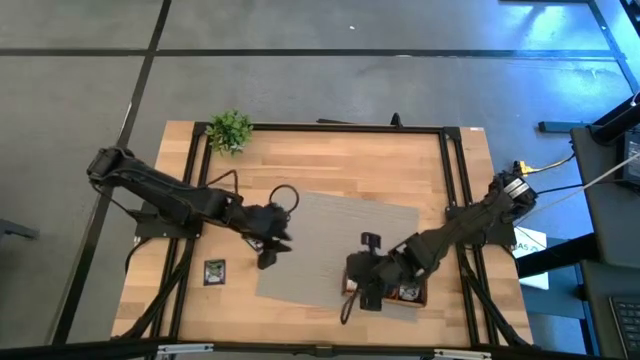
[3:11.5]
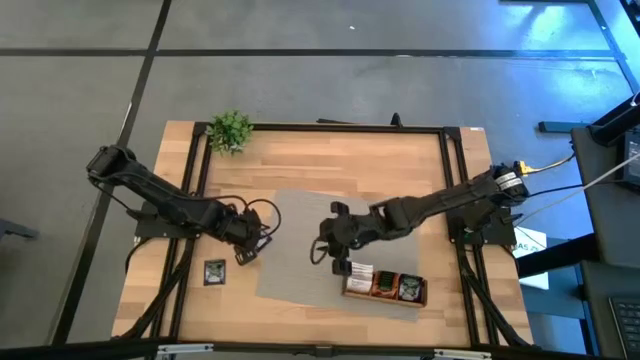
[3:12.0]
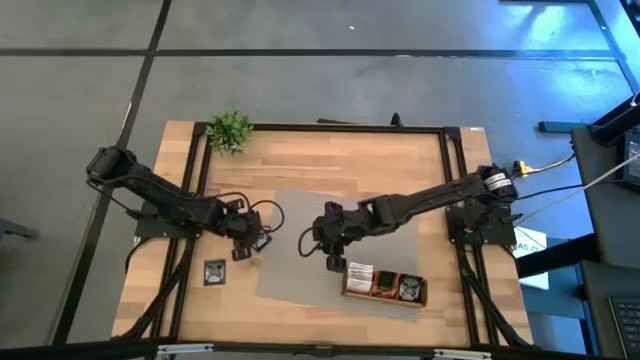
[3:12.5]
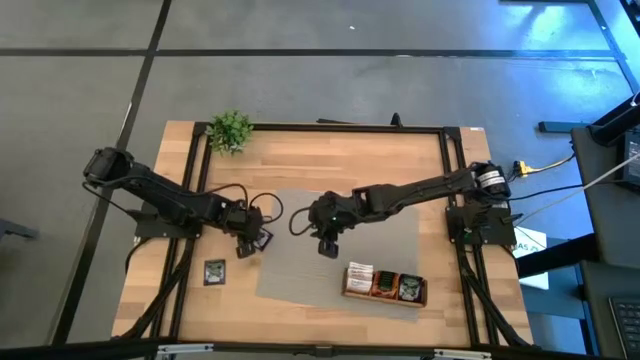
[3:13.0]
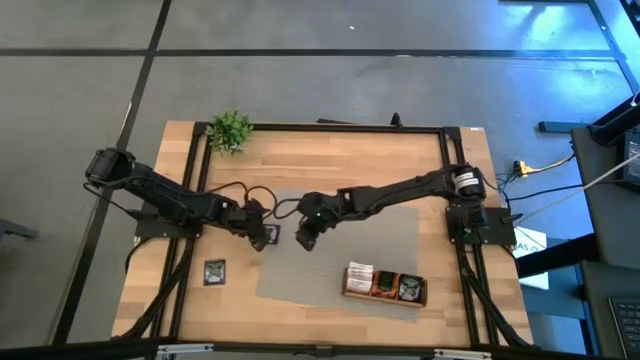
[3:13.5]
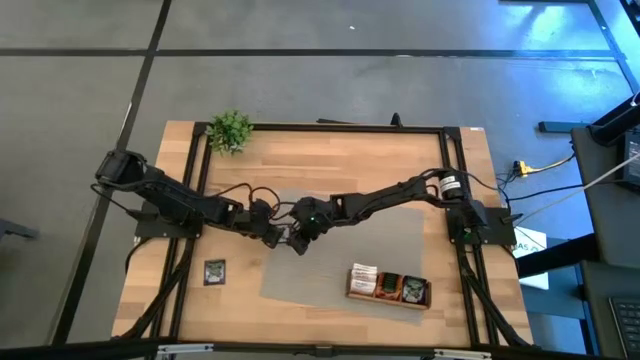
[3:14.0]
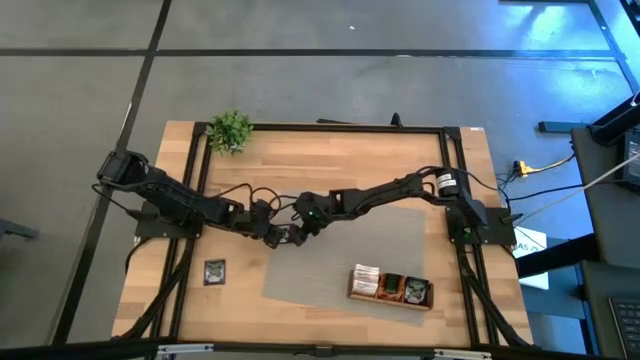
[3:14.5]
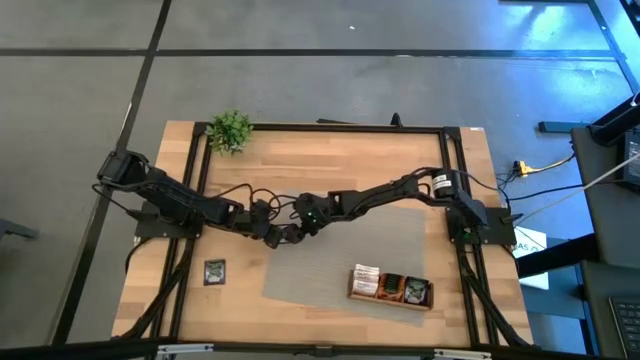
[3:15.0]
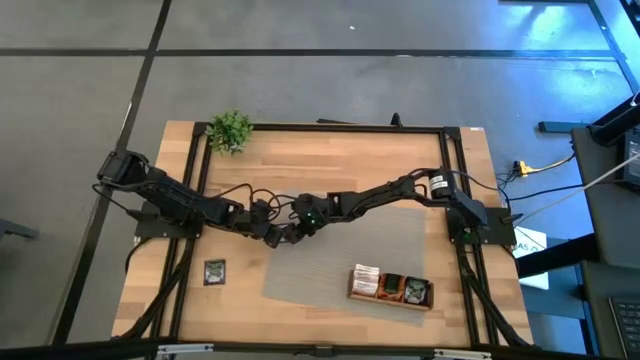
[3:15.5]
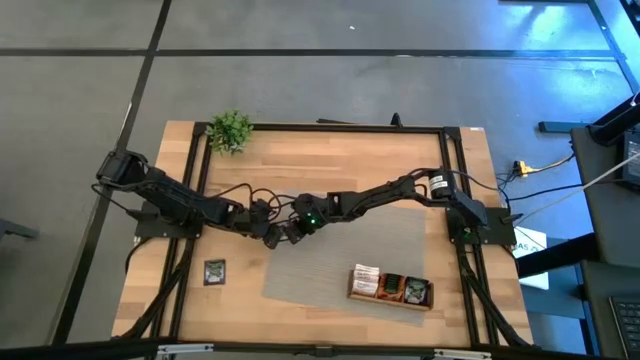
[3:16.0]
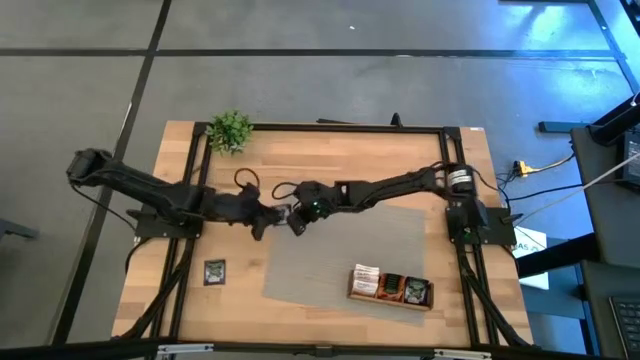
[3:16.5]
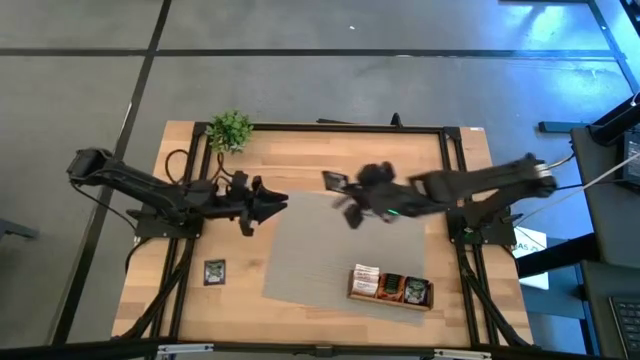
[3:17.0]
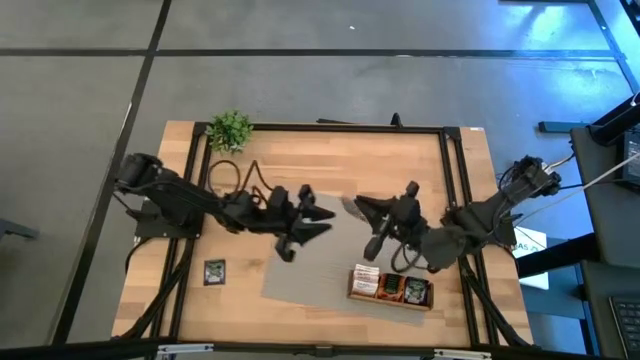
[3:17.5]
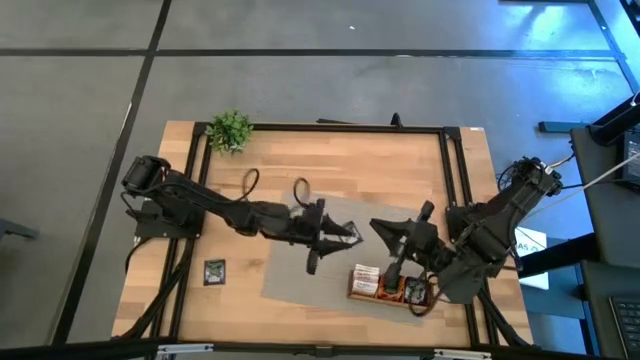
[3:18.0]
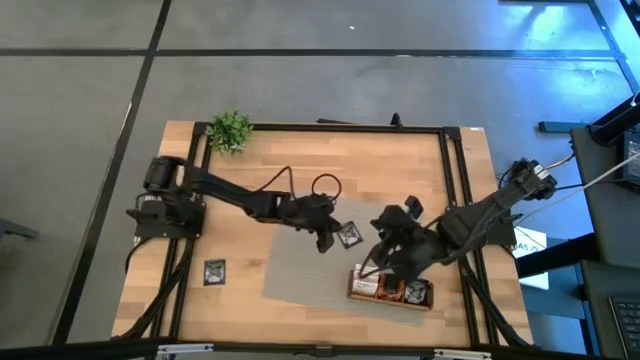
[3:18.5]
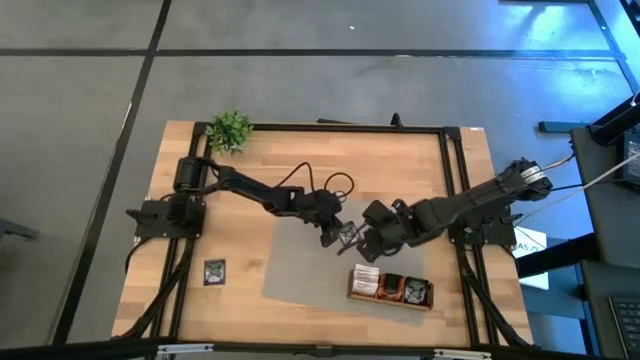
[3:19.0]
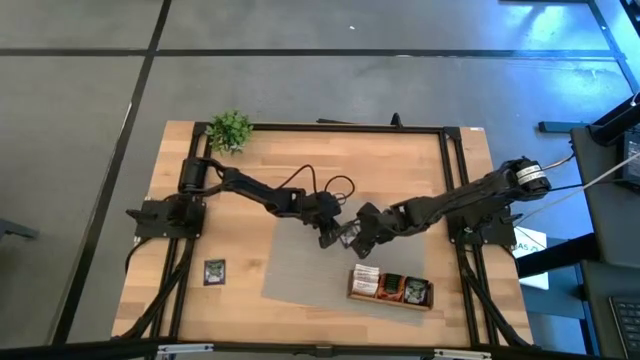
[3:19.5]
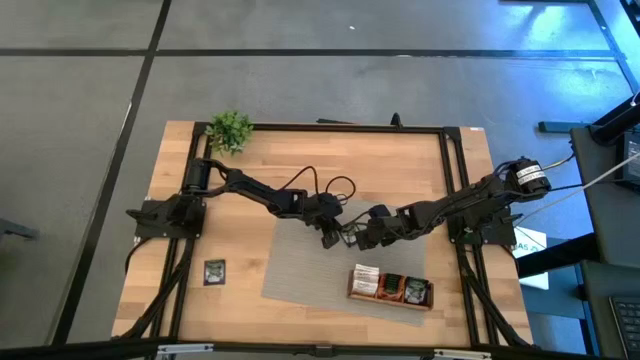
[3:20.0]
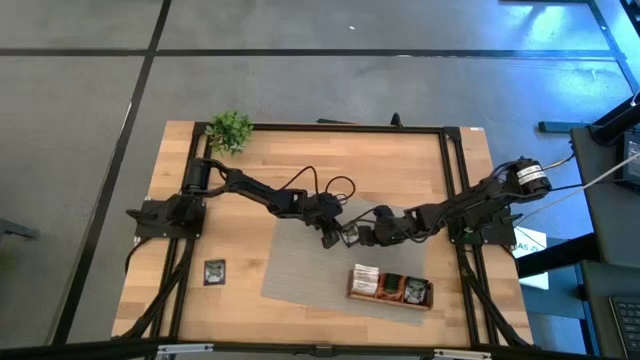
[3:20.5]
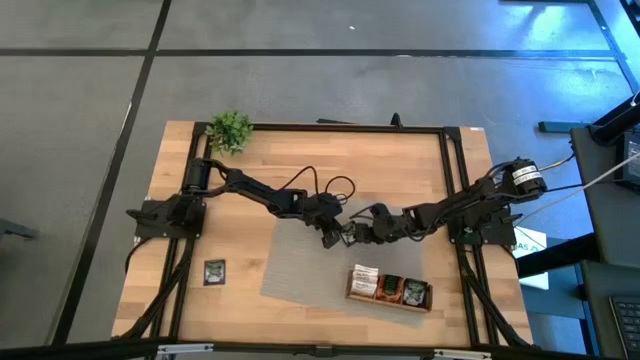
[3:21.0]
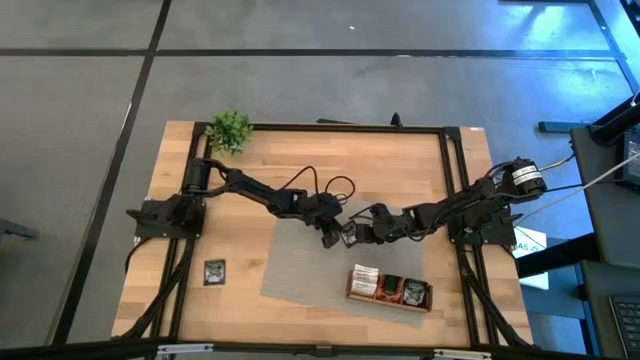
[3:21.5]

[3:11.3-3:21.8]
Task: Pick & Place Tea
Put the right black tea bag into the right compartment of the wooden organizer

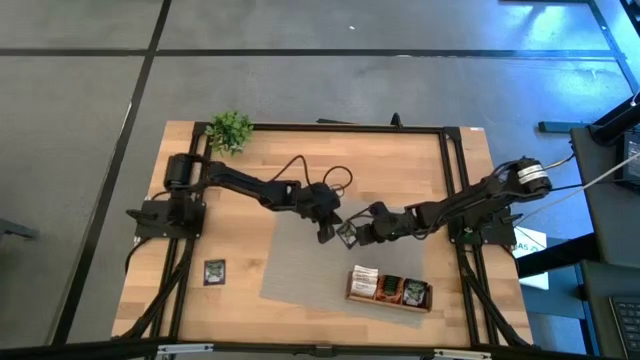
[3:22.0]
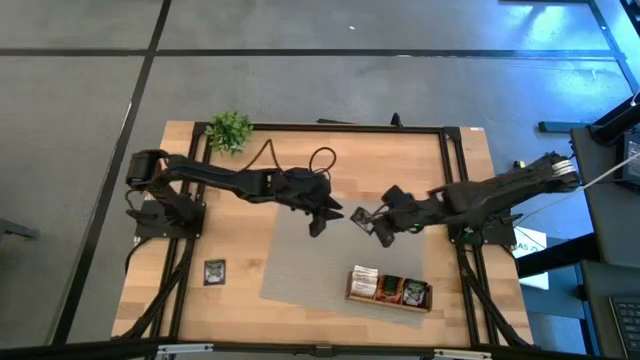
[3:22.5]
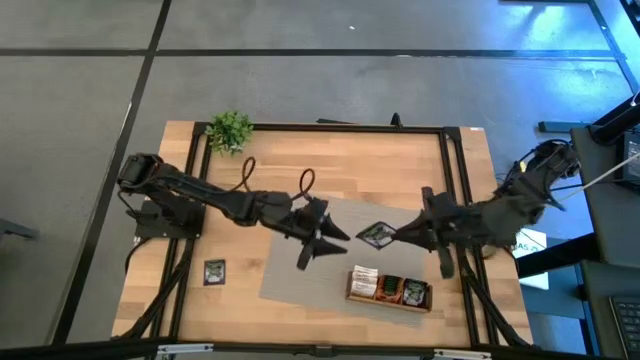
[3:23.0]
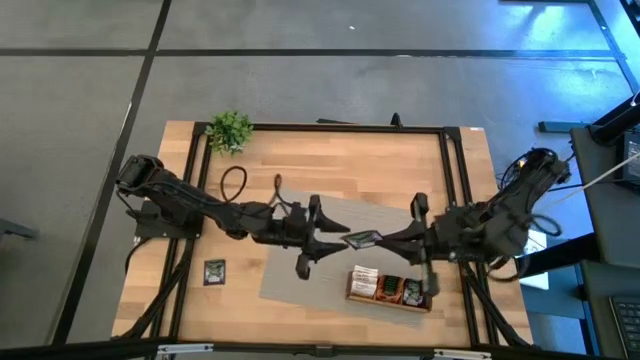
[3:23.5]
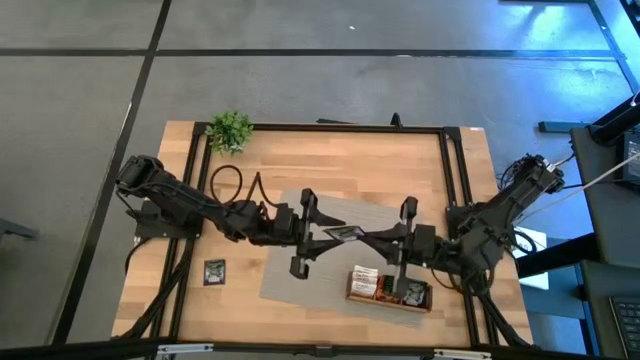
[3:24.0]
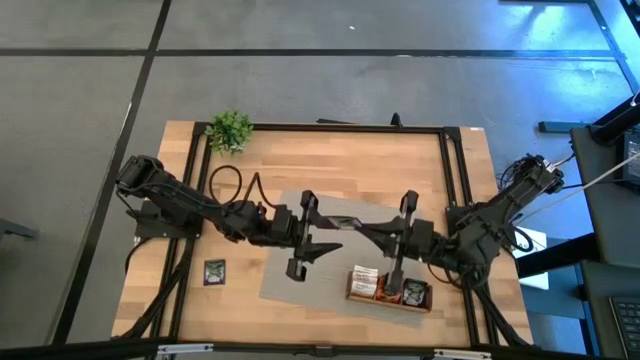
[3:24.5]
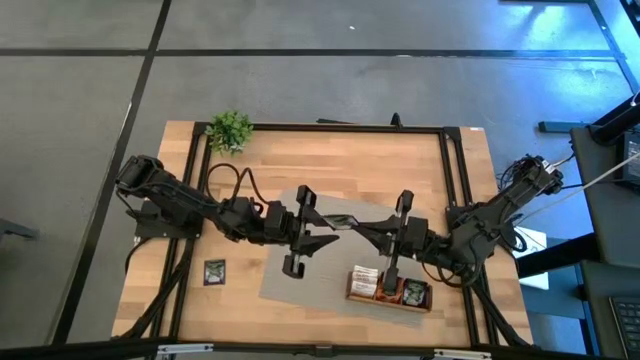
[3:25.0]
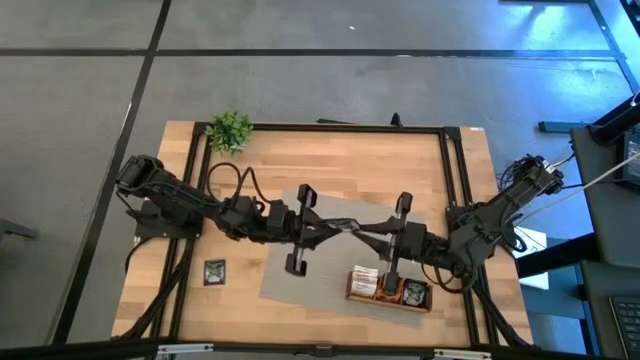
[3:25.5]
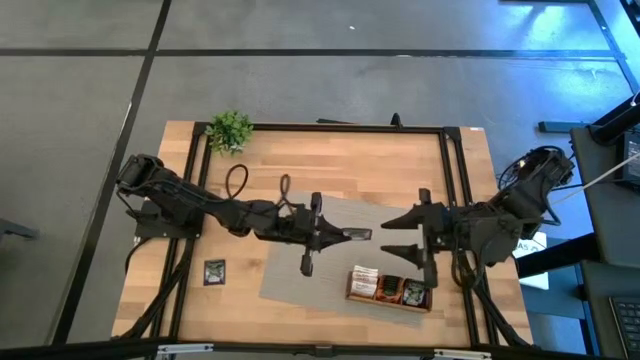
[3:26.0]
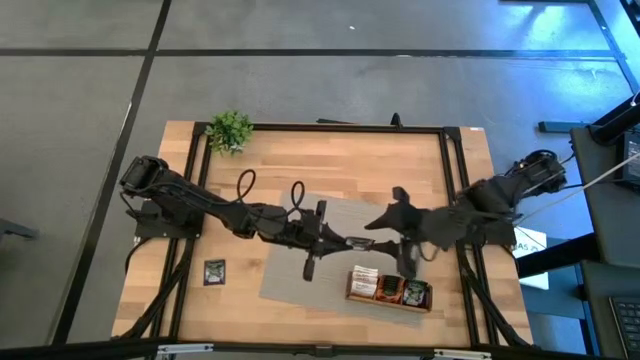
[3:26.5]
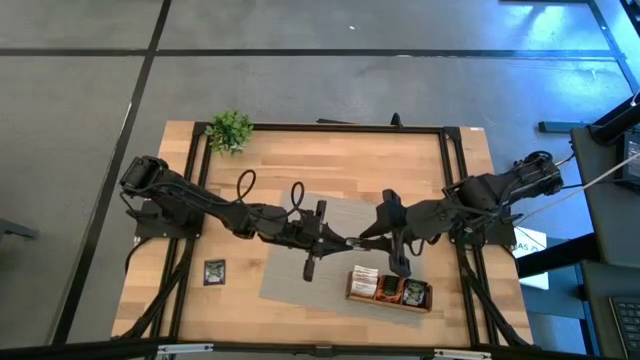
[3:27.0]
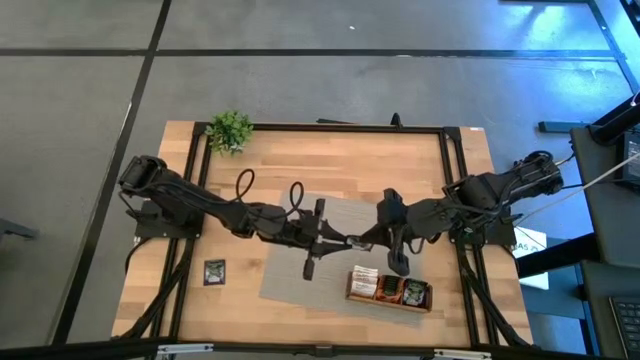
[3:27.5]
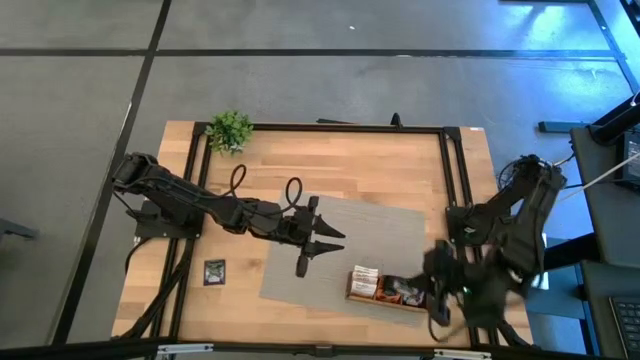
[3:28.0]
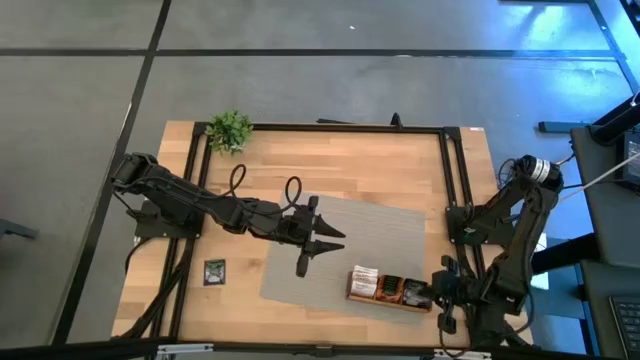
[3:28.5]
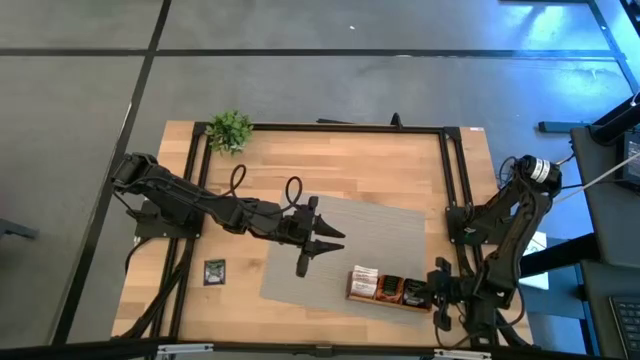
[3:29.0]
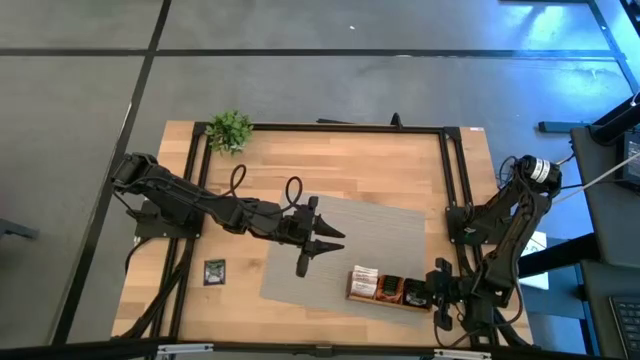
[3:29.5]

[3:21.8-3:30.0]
Put the right black tea bag into the right compartment of the wooden organizer

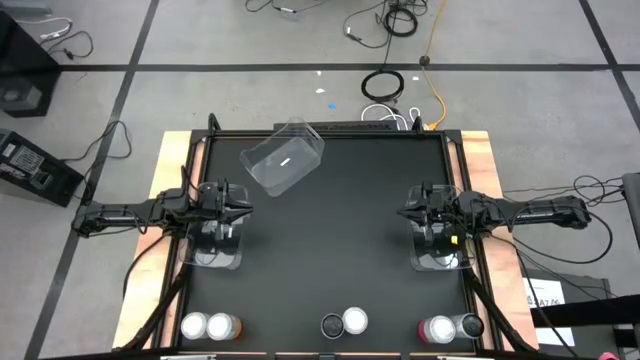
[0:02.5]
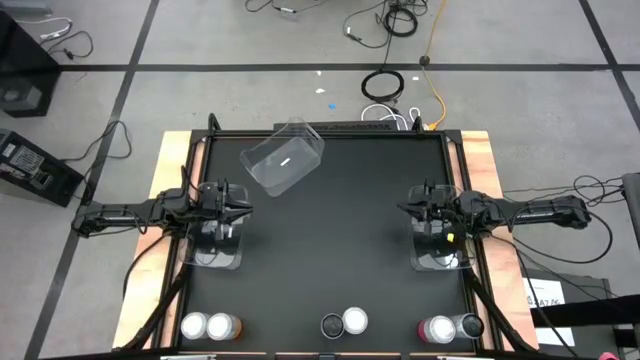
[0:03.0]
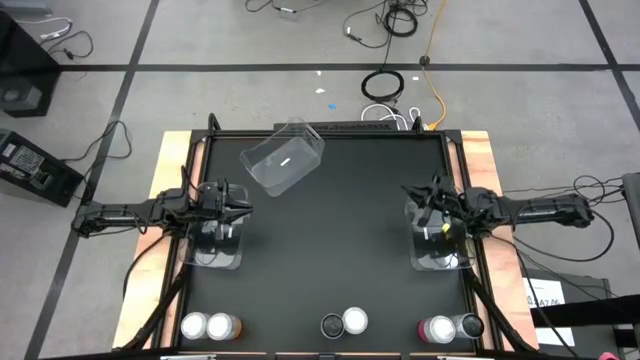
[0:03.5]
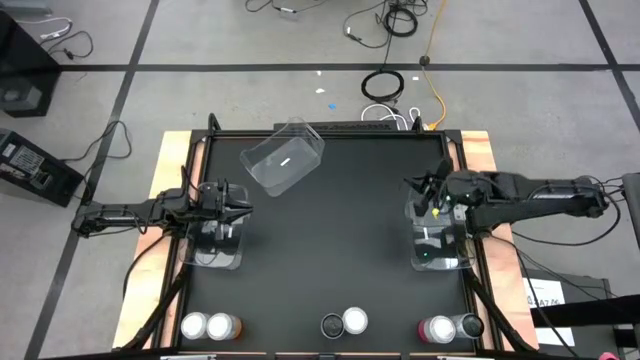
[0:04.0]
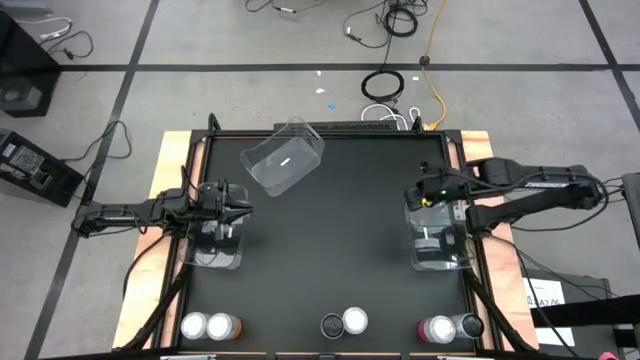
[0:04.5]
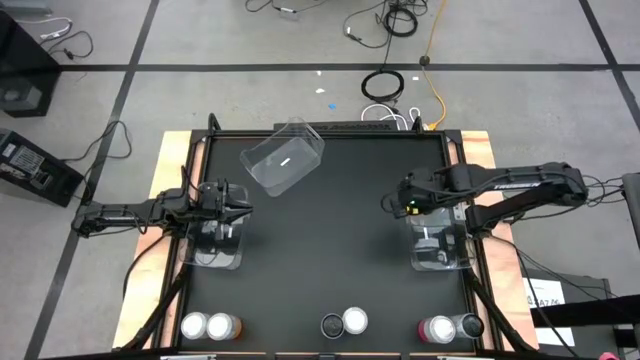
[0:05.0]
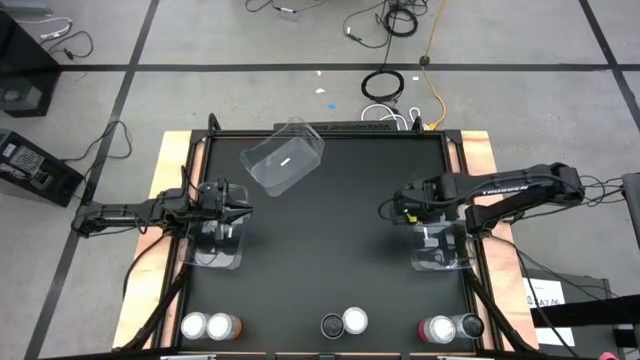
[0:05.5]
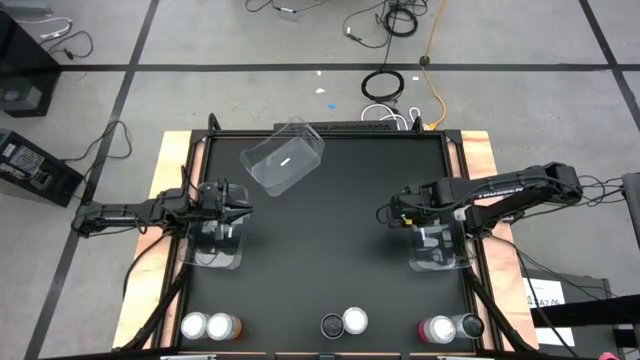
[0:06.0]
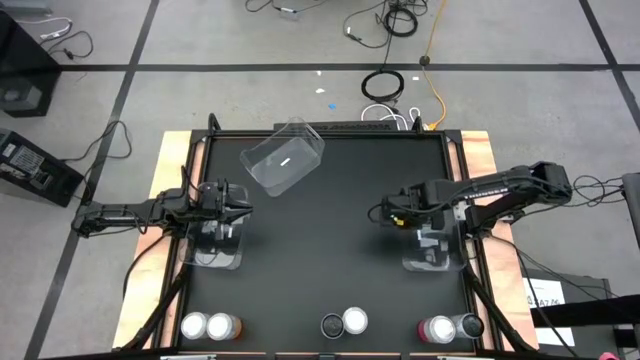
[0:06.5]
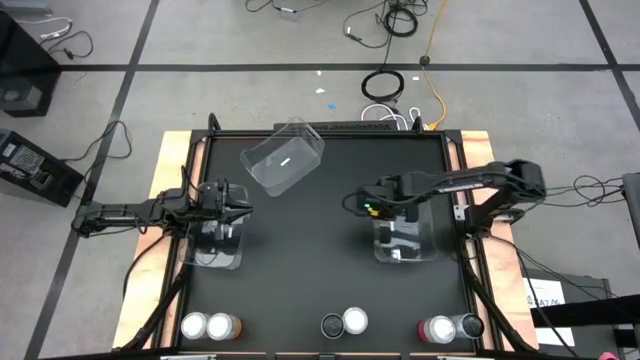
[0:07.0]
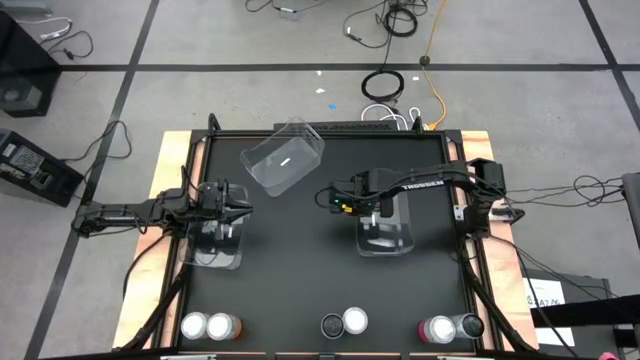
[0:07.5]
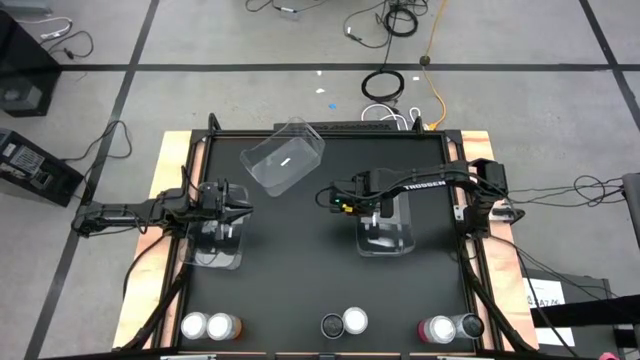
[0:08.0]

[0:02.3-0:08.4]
Task: Sort soda cans
Move the right transparent bin to middle right of the table
